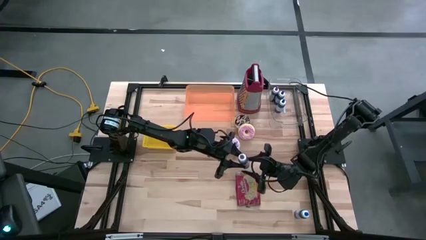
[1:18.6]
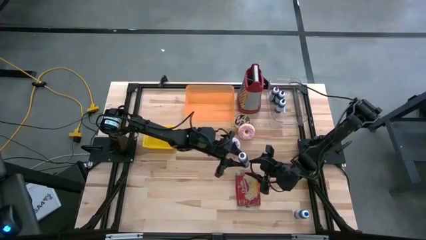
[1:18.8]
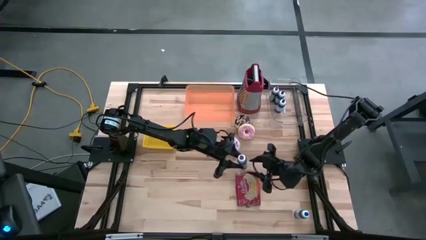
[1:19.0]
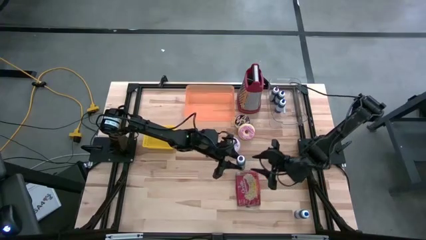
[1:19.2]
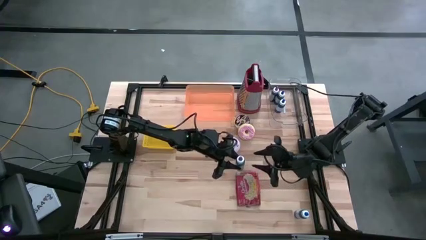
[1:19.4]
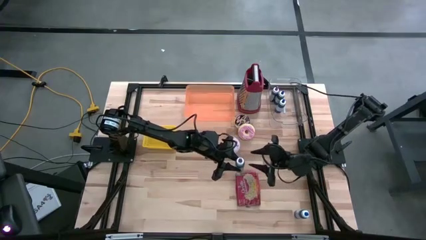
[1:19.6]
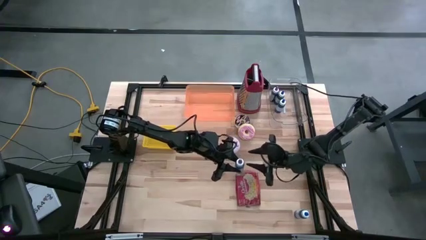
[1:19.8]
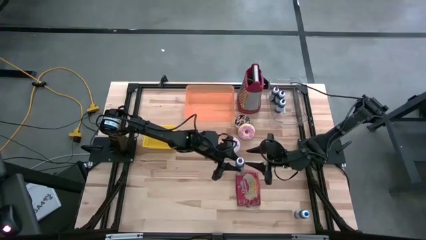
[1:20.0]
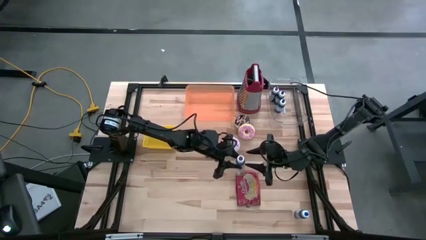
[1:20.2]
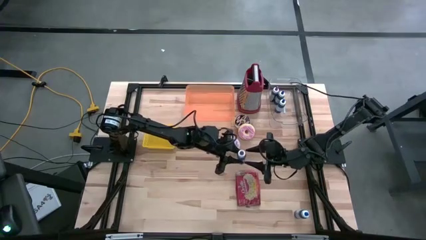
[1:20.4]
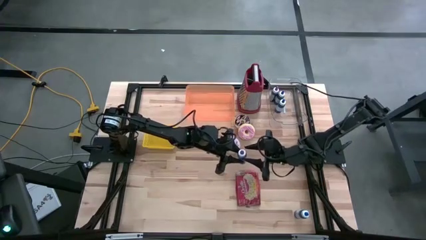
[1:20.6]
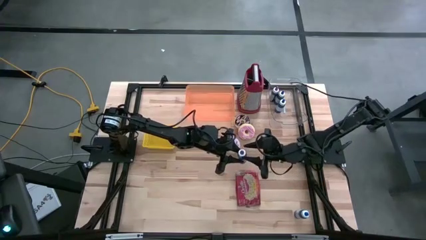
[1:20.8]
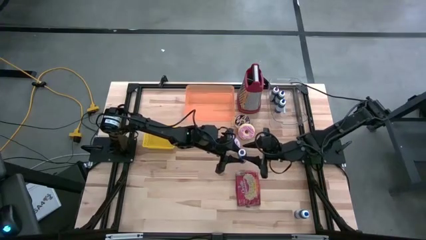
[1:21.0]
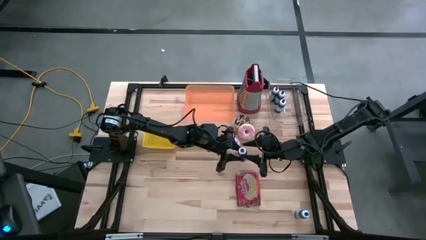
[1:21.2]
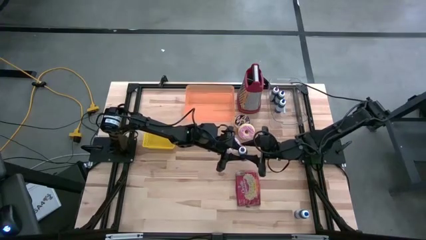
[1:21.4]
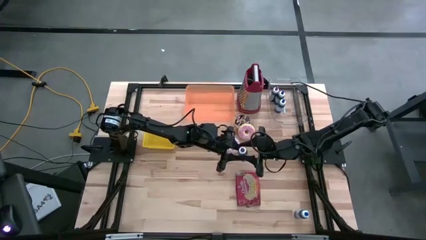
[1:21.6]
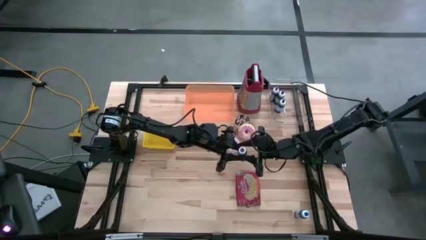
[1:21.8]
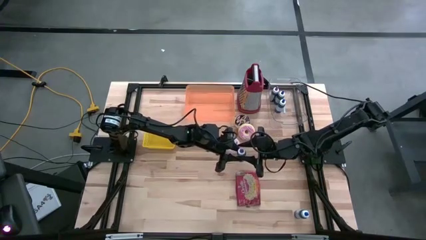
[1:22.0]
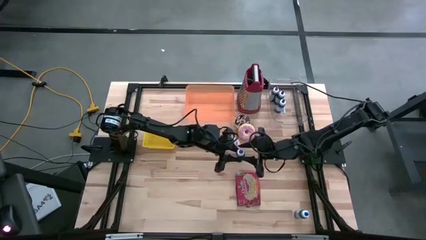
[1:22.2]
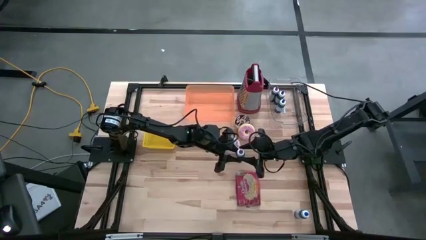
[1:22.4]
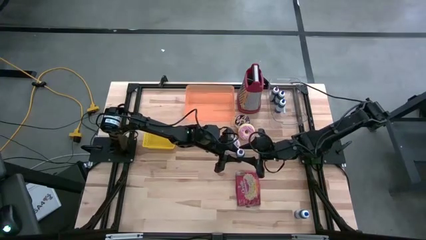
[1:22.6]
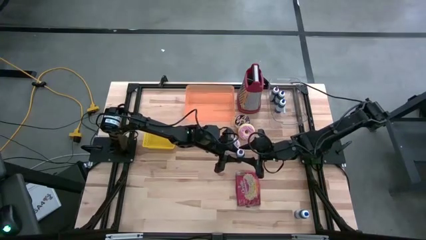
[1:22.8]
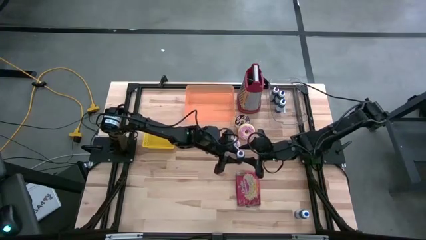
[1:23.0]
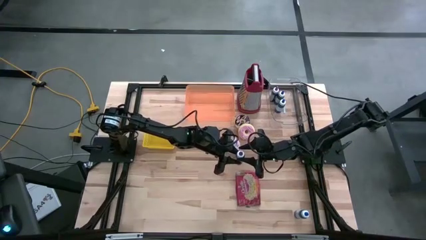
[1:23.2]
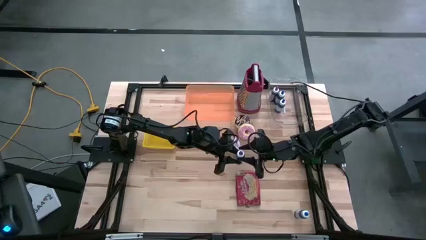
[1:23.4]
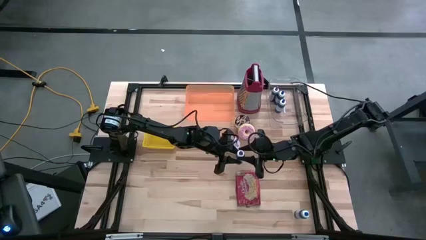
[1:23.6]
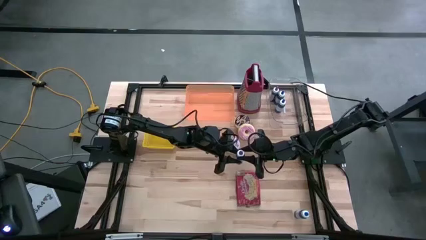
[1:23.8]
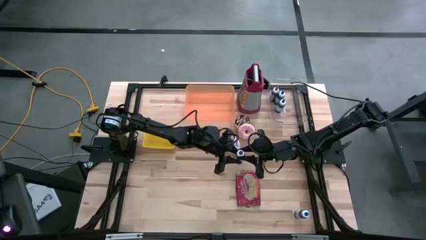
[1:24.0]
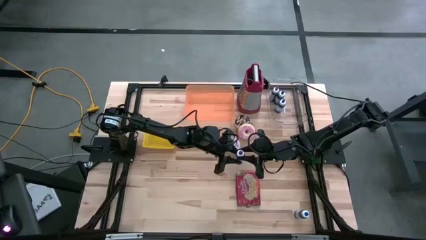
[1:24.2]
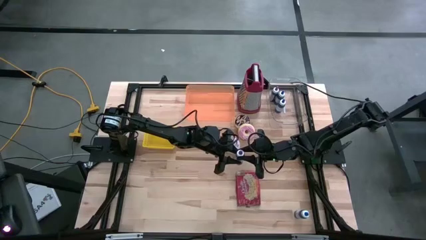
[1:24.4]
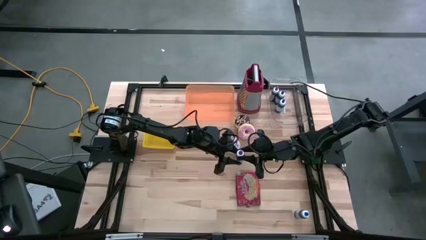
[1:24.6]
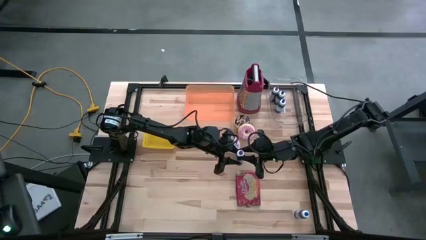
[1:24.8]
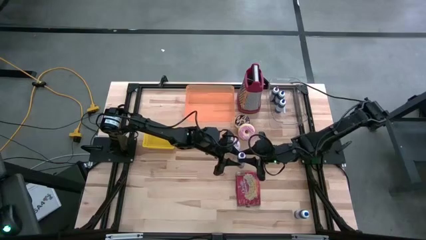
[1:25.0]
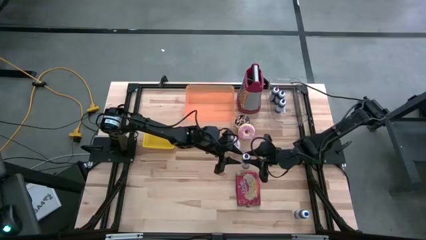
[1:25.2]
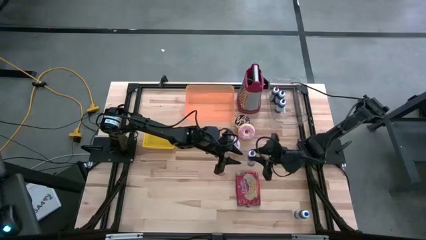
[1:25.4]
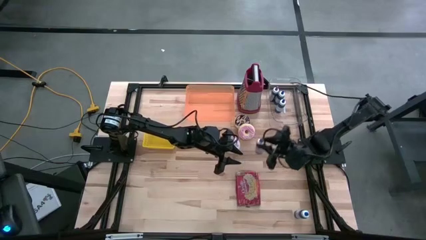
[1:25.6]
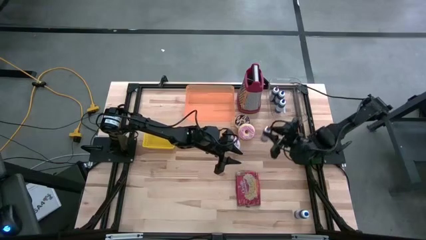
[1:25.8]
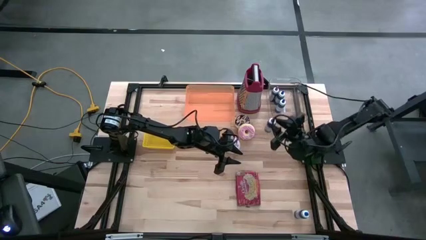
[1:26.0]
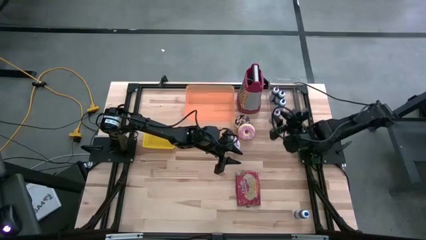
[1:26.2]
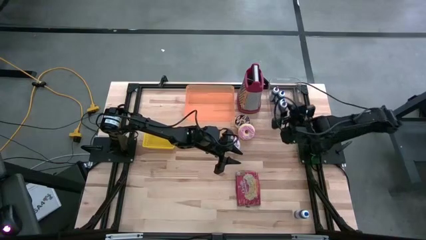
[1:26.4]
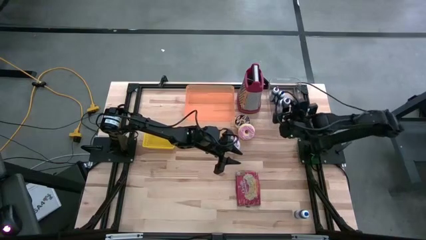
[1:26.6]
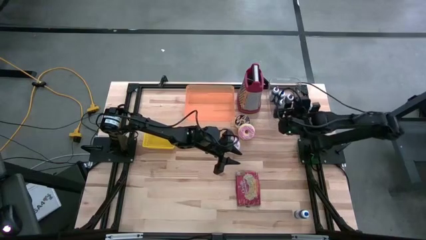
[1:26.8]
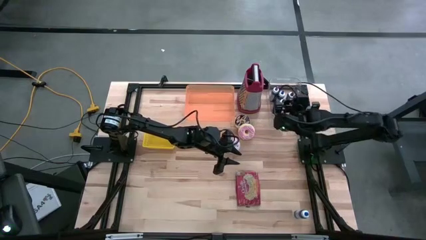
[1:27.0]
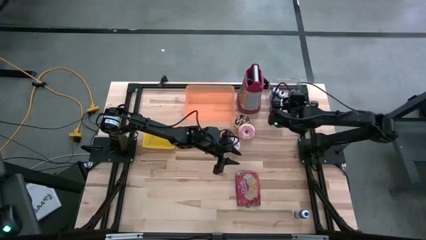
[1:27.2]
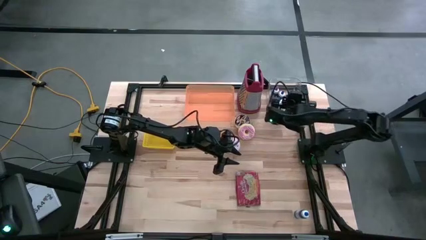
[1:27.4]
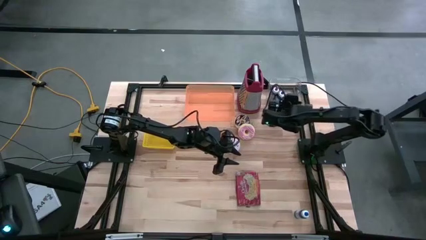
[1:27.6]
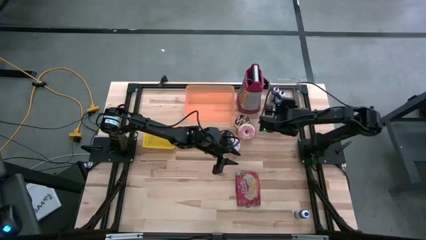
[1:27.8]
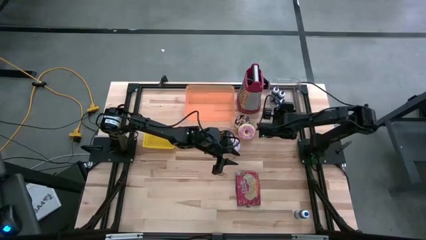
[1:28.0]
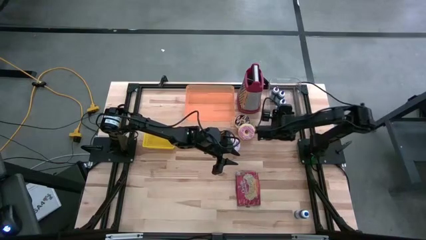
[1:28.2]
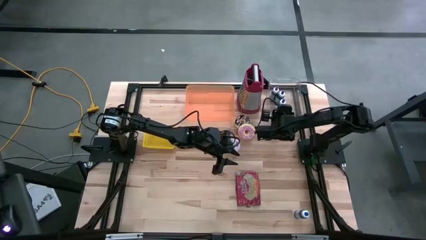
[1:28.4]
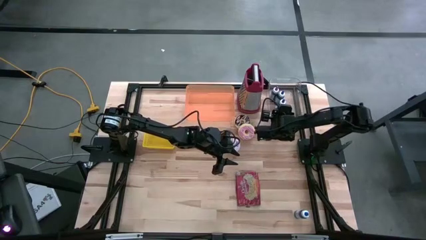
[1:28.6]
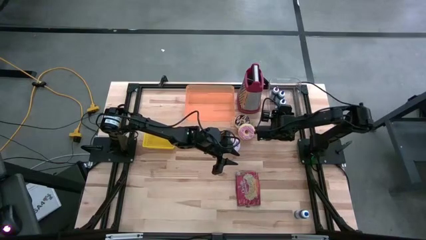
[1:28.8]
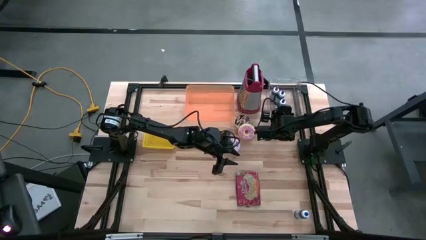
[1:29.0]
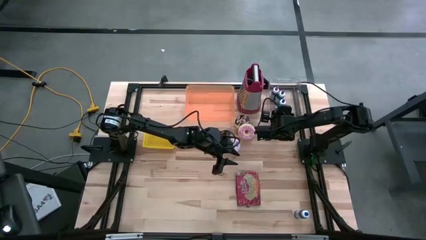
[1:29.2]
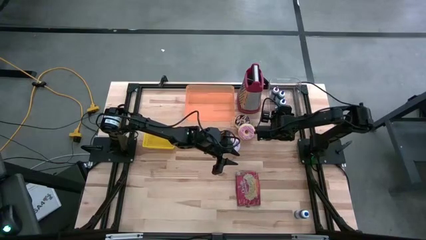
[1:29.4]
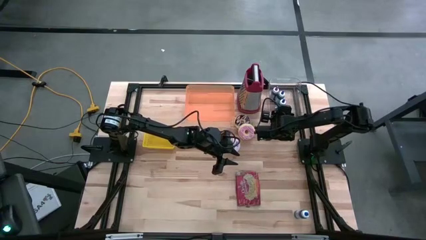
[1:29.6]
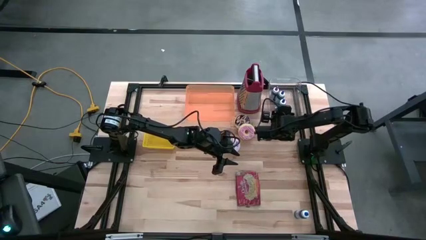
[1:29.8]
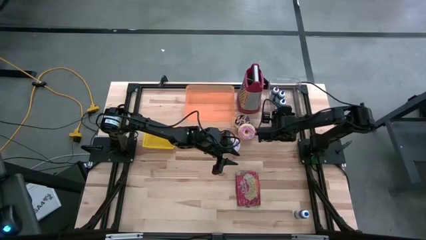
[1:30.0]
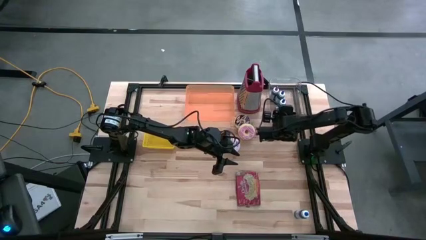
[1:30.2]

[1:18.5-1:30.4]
Task: Pick & Place Food Item
Put the violet food coloring bottle into the transparent bin

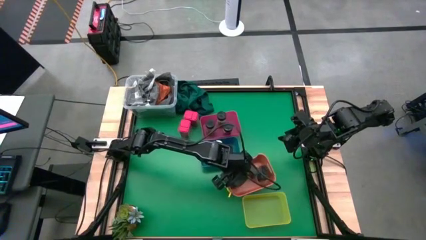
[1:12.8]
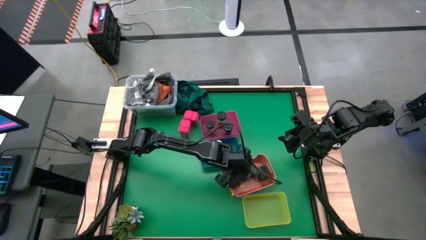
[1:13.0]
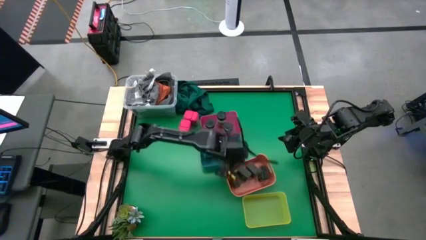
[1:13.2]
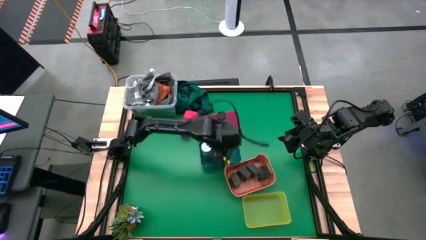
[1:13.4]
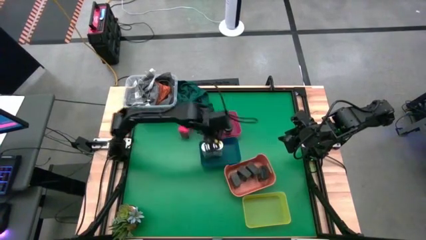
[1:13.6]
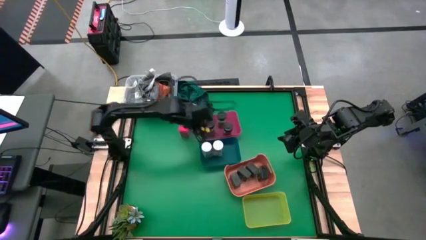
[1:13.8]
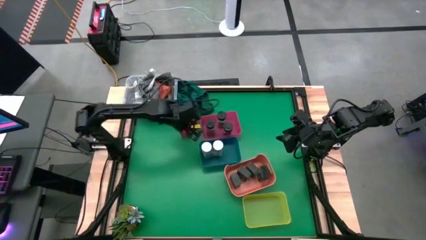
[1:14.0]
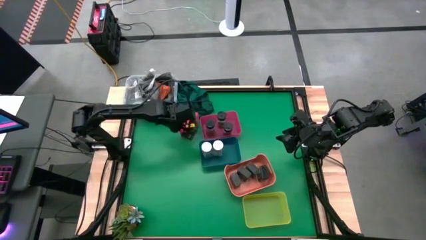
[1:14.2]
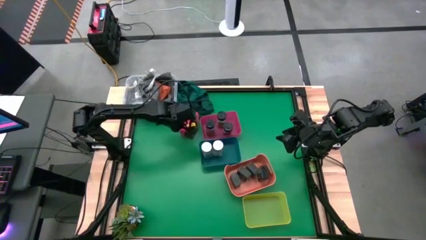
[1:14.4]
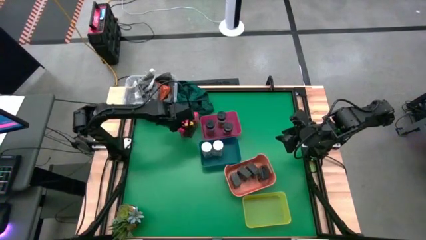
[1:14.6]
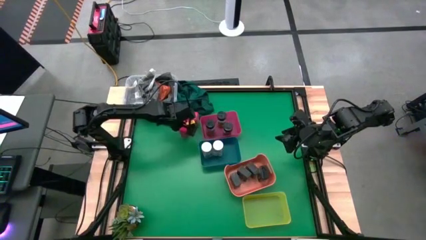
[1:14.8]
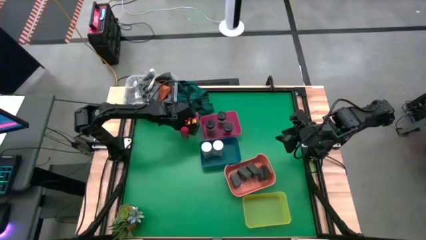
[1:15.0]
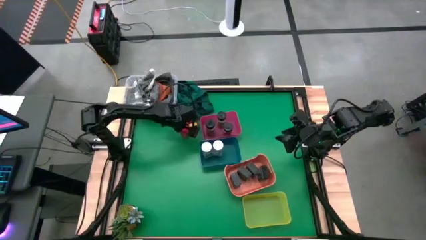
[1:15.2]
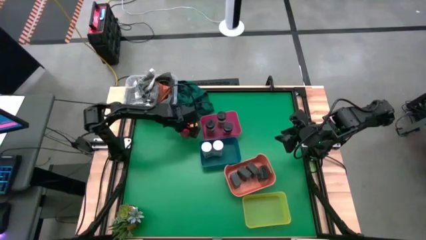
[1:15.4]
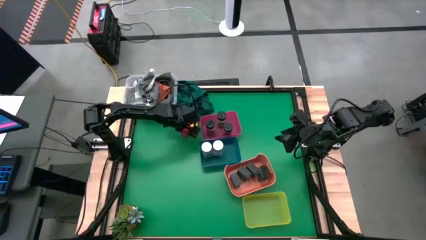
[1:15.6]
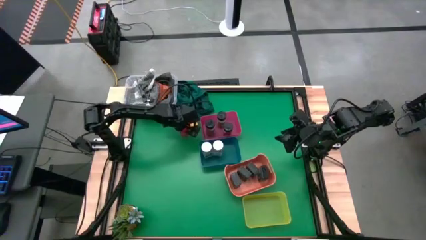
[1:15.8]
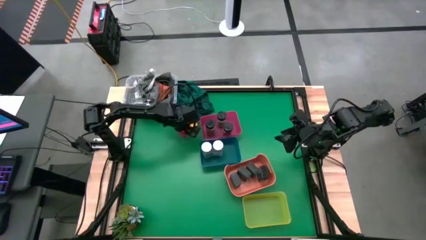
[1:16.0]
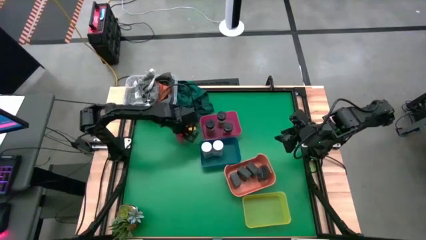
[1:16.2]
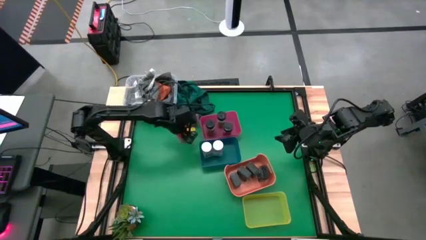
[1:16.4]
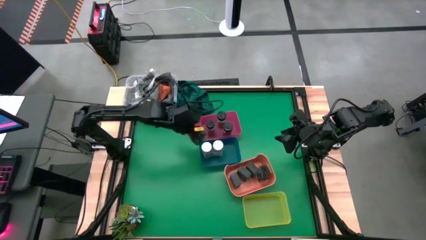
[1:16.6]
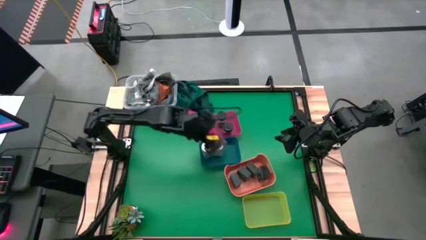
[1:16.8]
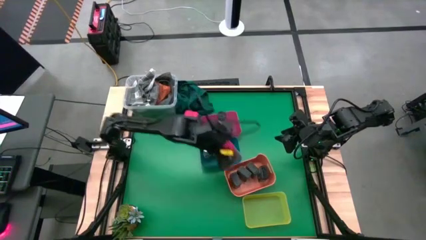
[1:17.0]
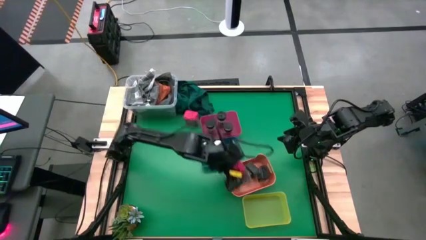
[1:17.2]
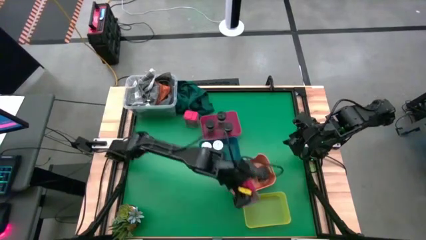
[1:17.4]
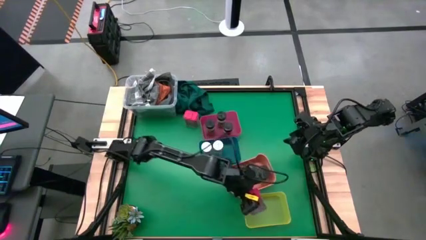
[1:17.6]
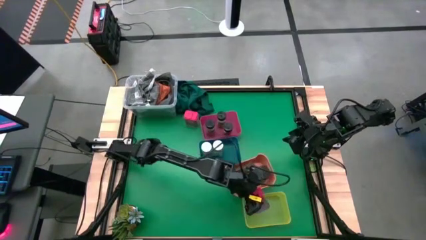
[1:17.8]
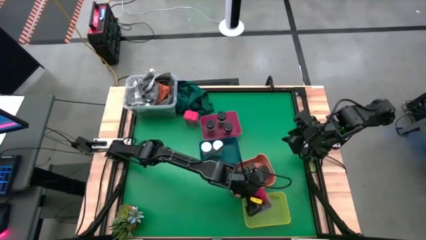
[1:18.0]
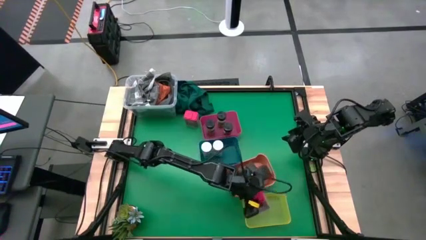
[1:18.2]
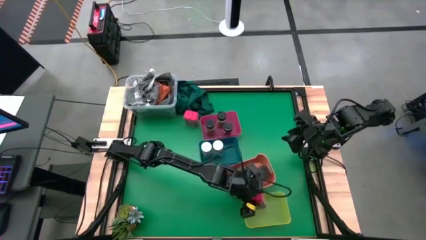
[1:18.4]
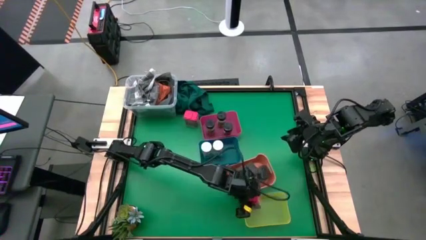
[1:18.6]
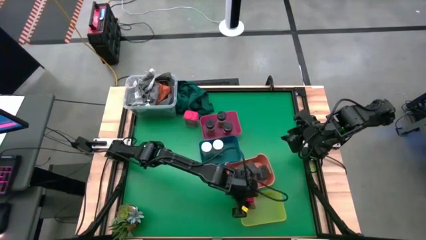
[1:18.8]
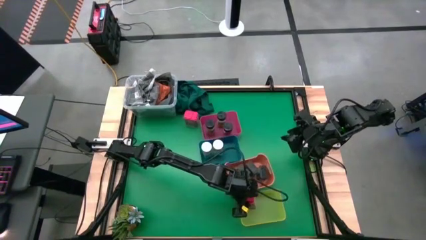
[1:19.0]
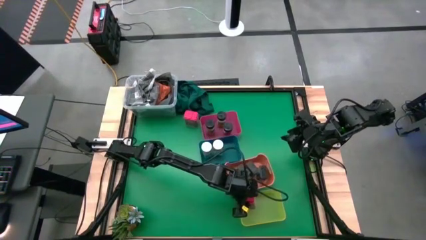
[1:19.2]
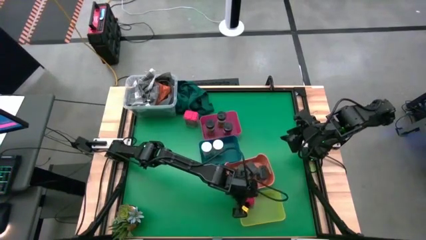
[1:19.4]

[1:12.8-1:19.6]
Task: Sort spices by type
Put the bottom red seasoning can into the yellow bin
